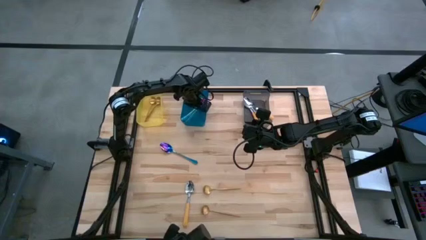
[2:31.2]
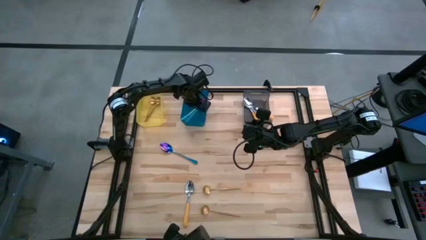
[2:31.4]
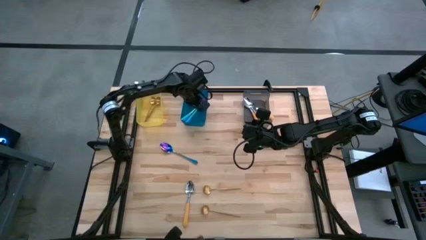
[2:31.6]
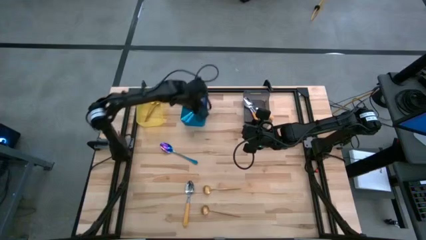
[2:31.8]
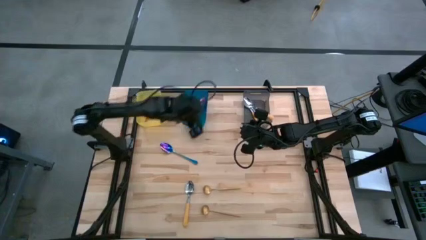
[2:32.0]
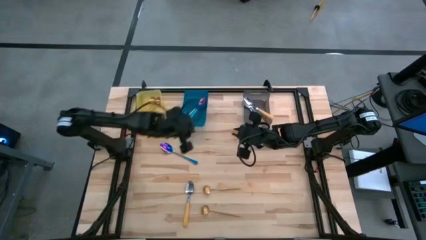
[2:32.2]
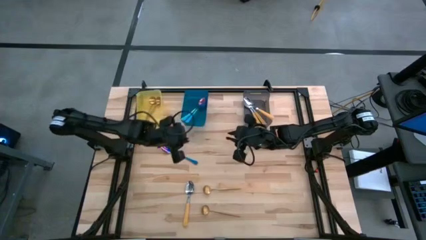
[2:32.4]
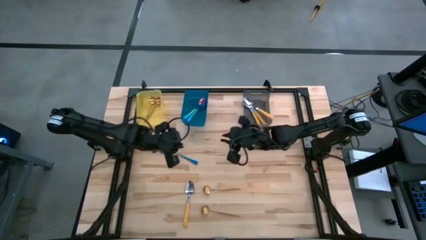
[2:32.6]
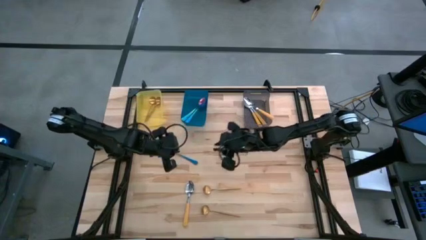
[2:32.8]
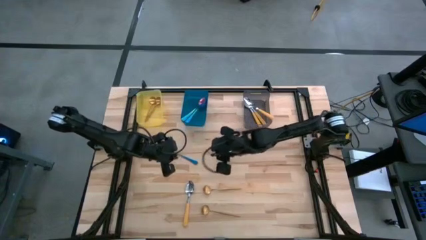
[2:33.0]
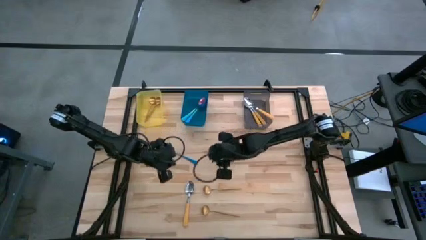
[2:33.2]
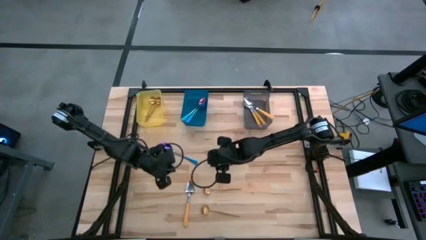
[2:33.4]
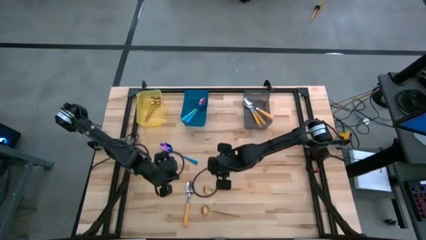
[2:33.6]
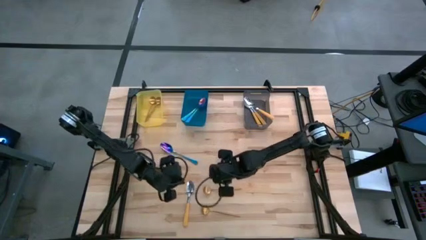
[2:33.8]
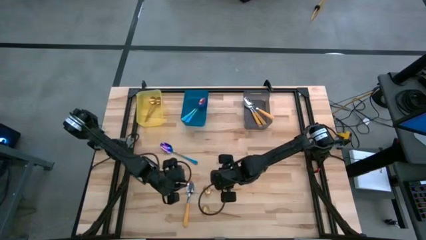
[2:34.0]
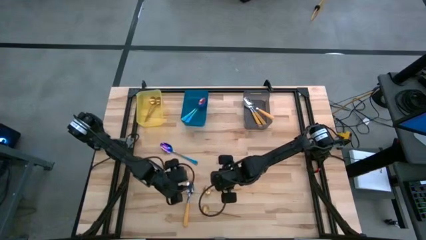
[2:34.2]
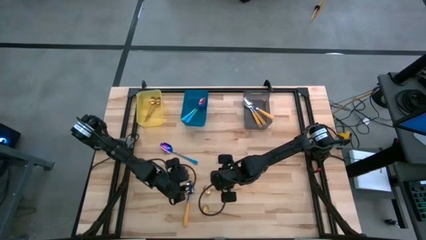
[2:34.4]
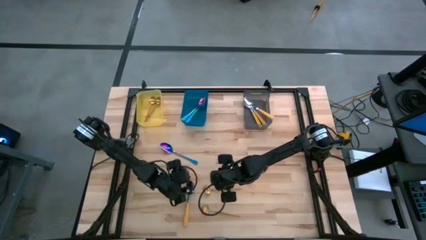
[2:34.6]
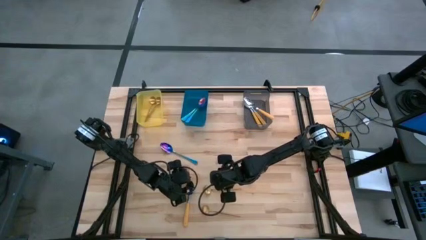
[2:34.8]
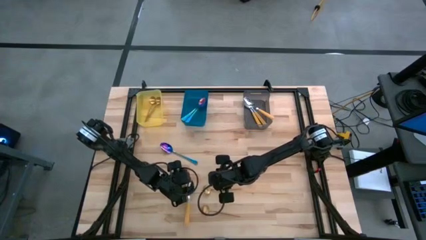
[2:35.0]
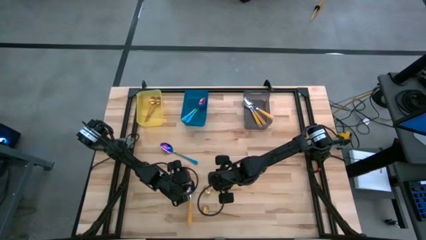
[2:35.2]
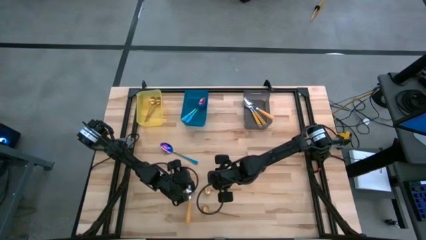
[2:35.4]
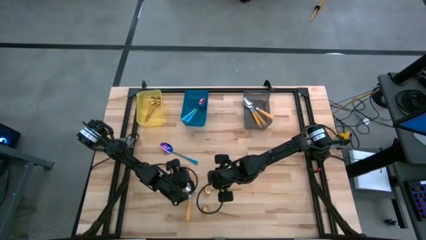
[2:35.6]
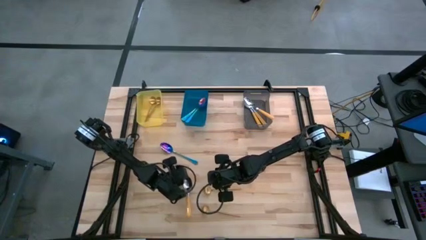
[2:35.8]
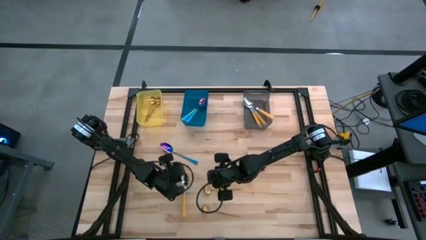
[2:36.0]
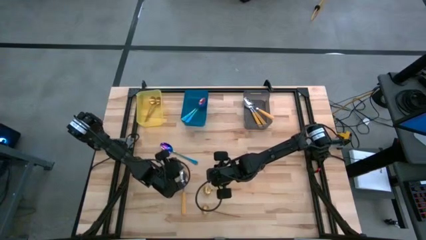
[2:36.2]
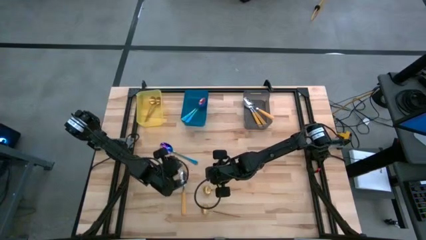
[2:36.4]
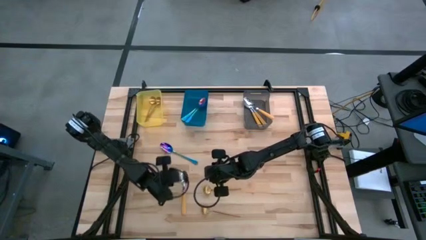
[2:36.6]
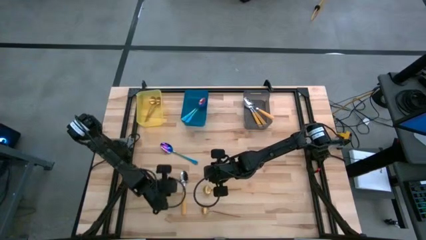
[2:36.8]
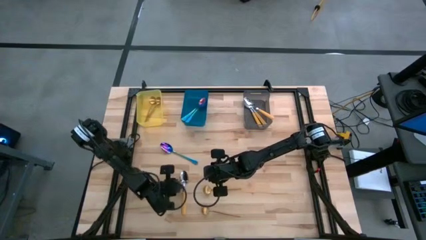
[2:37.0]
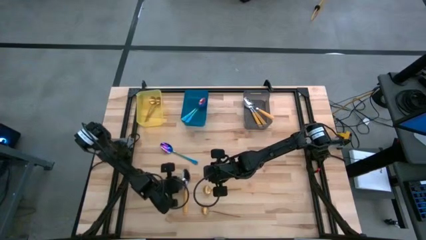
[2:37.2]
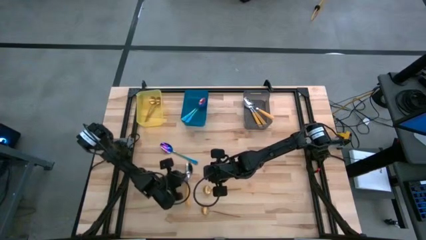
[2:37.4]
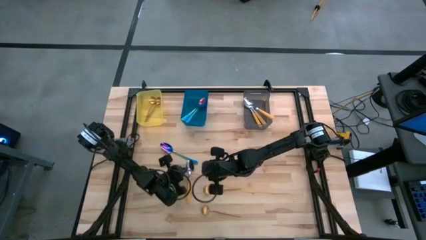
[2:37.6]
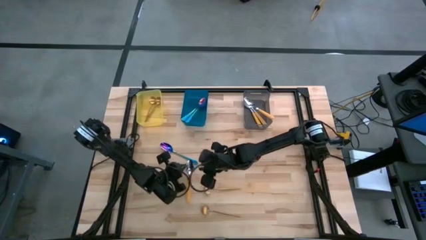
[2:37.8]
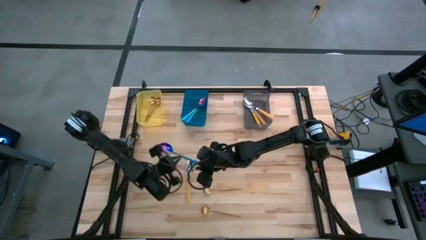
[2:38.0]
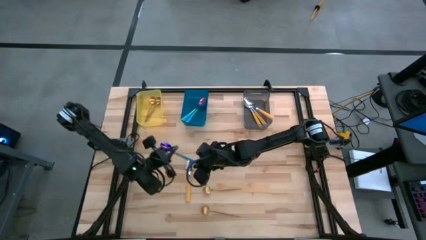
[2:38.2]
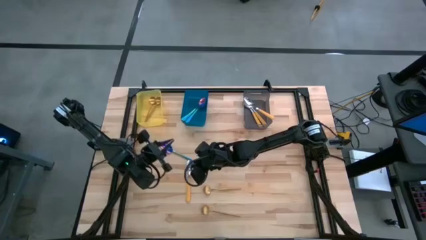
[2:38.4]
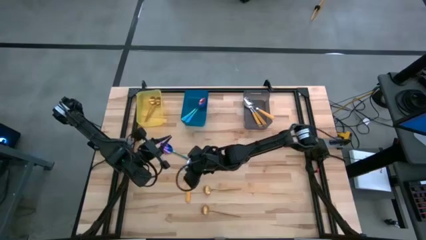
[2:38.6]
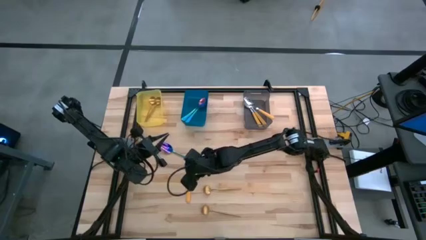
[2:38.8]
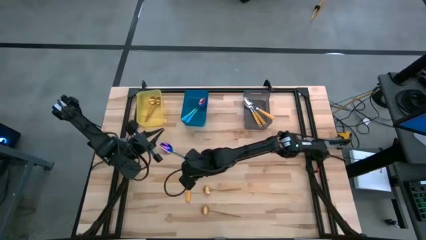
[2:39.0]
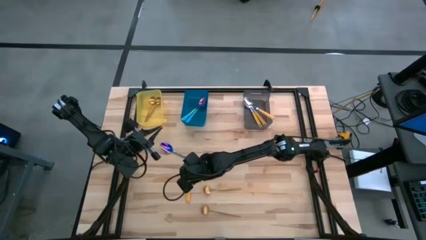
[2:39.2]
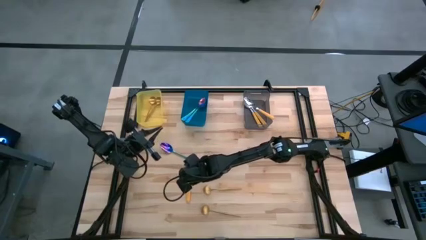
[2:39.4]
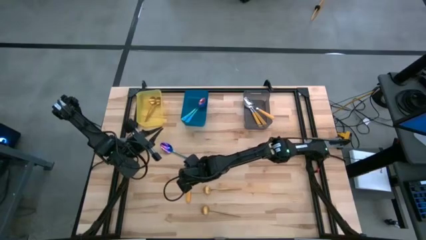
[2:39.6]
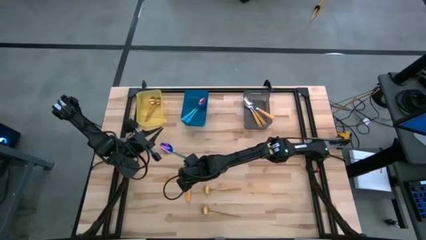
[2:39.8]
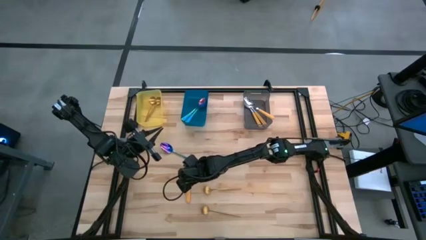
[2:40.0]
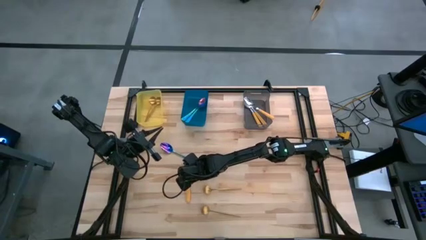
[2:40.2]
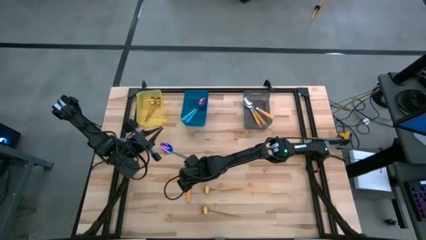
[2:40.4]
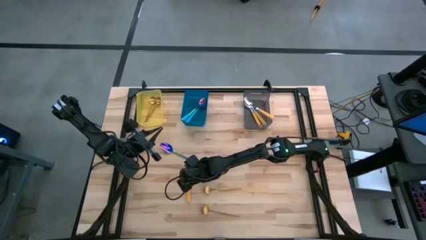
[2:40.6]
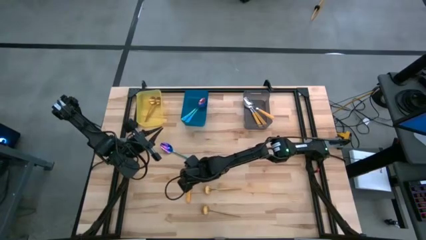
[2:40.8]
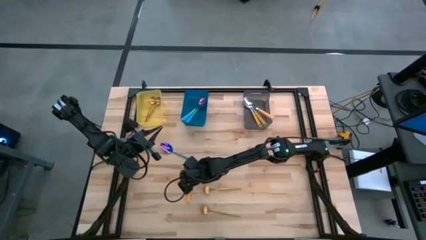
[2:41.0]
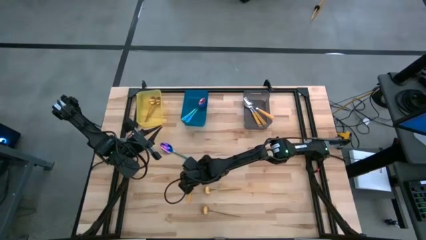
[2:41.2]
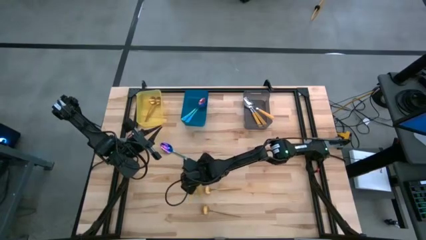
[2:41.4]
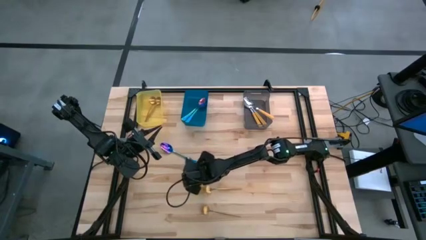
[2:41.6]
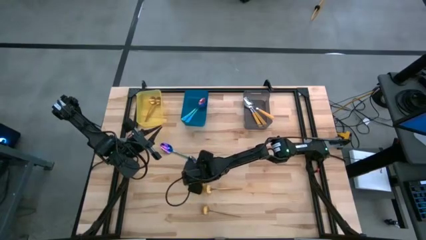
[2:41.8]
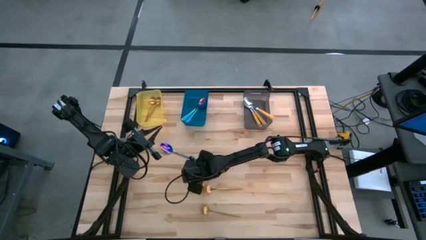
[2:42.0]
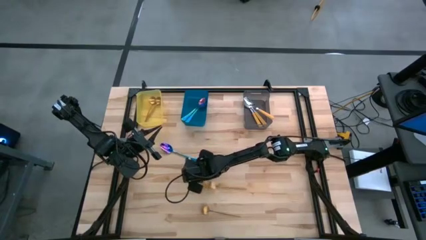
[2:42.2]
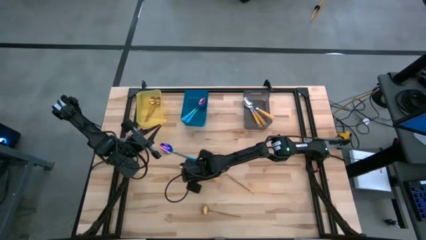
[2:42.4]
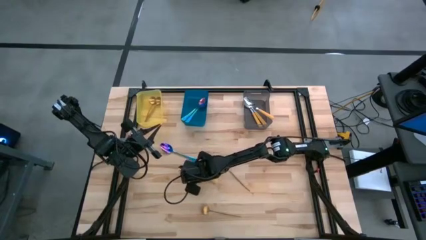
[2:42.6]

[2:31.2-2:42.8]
Task: Sort silverware by color (type)
Put the yellow spoon into the black bin

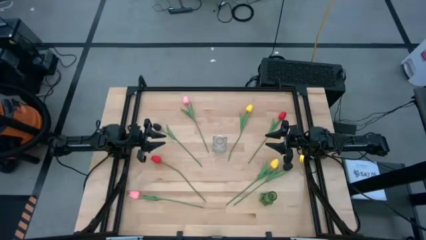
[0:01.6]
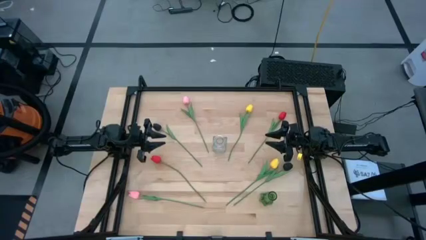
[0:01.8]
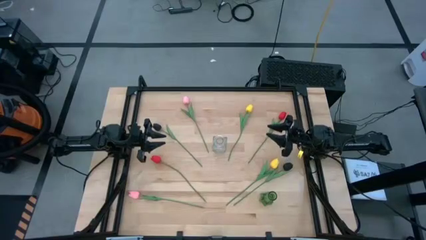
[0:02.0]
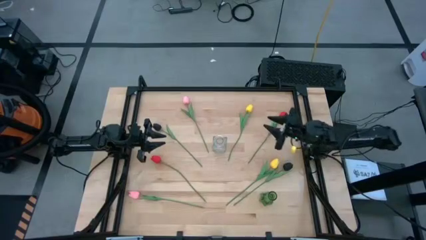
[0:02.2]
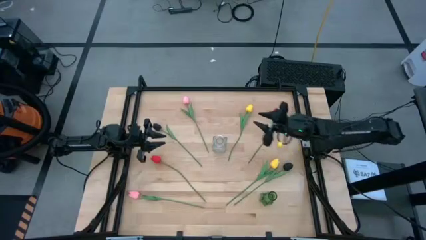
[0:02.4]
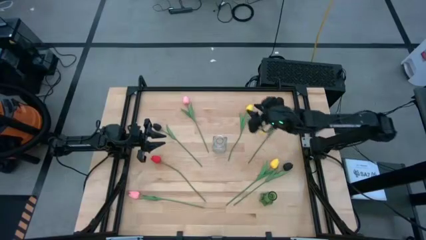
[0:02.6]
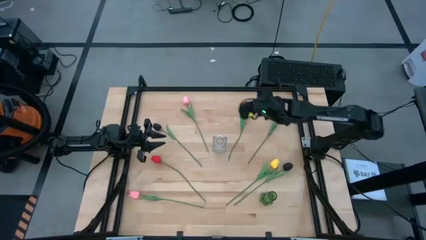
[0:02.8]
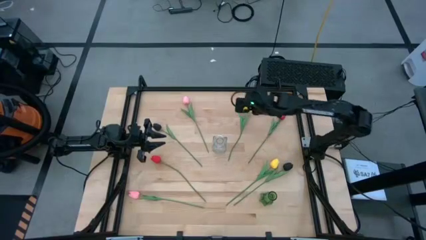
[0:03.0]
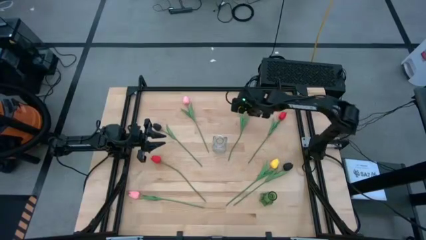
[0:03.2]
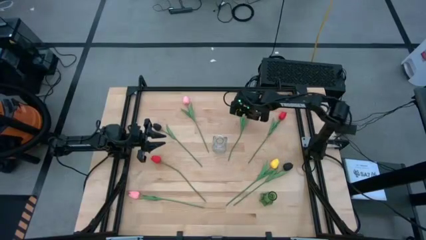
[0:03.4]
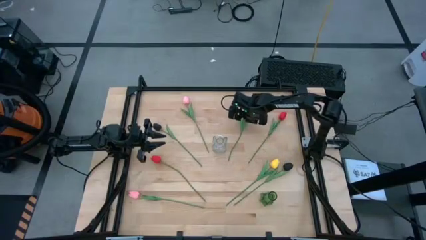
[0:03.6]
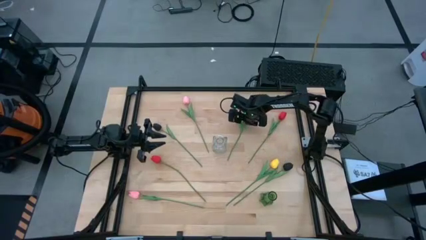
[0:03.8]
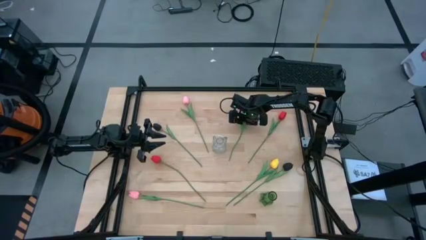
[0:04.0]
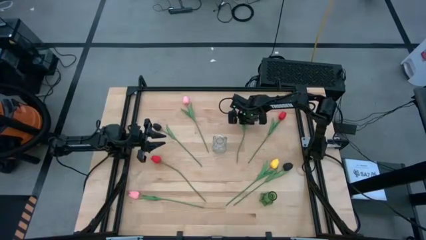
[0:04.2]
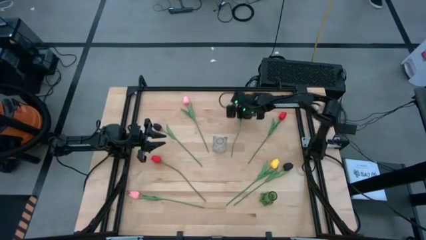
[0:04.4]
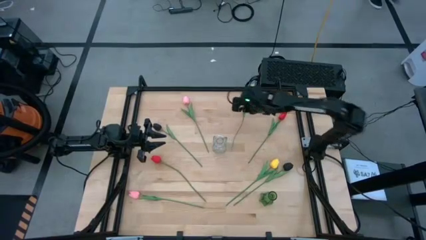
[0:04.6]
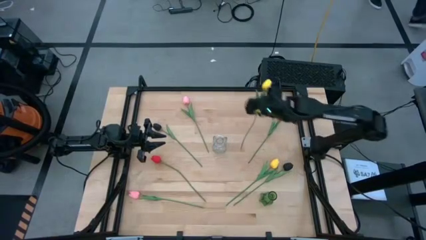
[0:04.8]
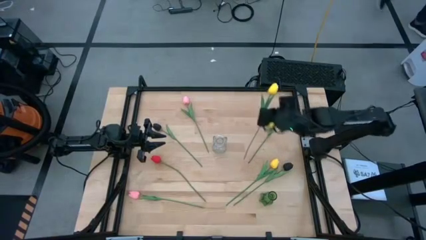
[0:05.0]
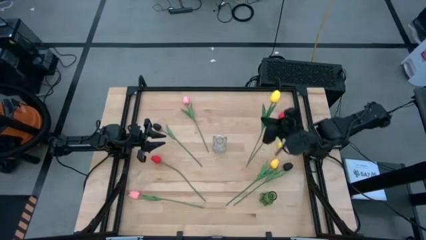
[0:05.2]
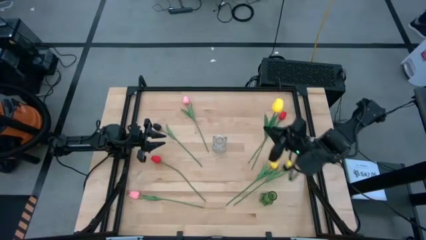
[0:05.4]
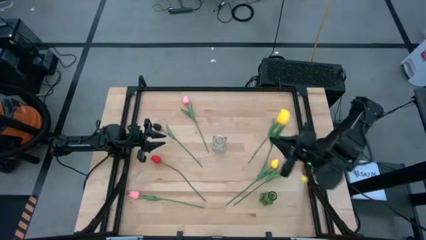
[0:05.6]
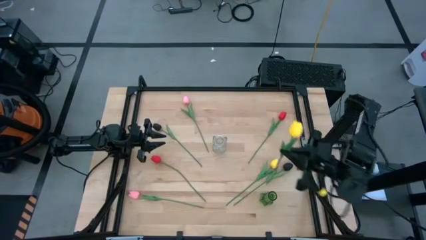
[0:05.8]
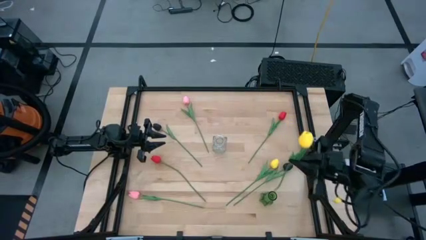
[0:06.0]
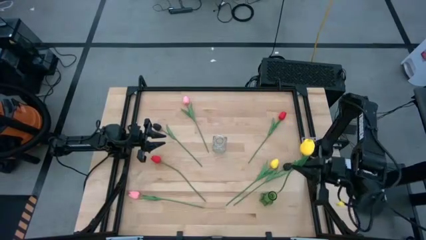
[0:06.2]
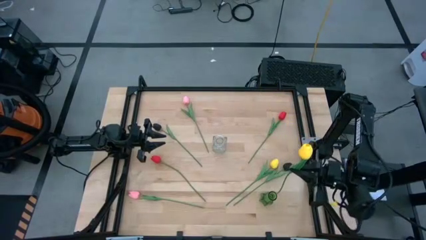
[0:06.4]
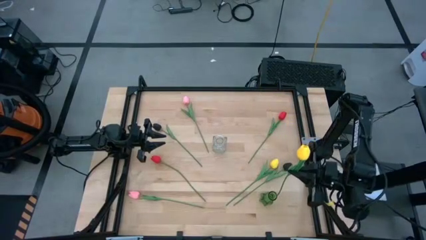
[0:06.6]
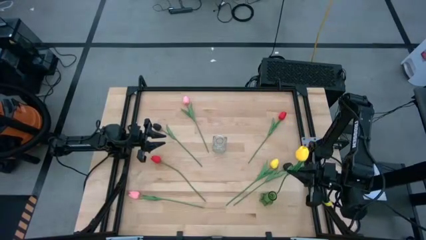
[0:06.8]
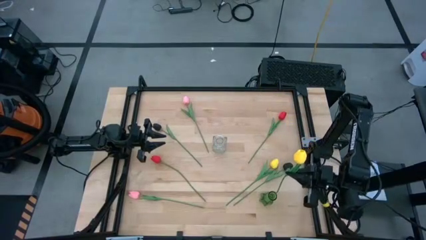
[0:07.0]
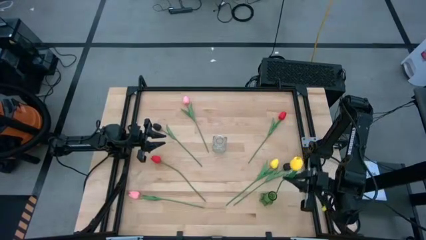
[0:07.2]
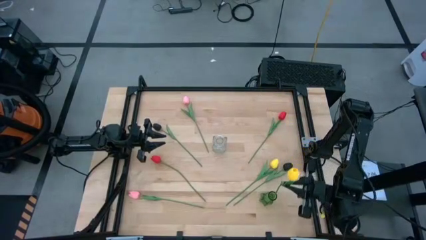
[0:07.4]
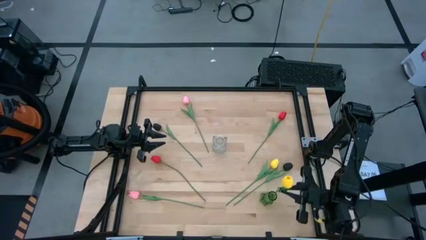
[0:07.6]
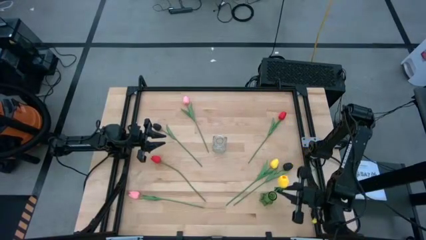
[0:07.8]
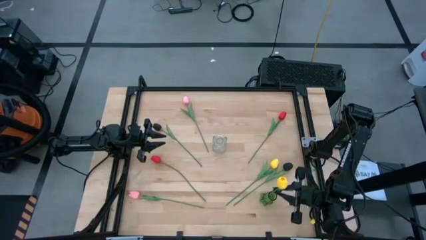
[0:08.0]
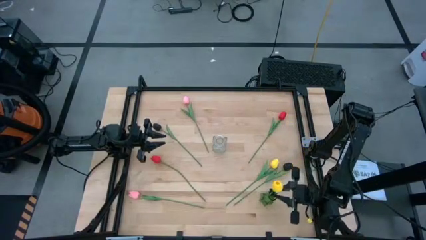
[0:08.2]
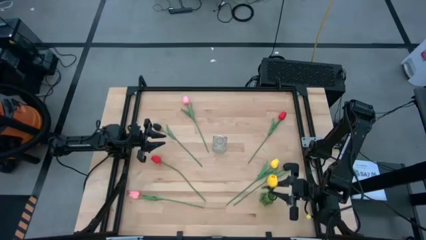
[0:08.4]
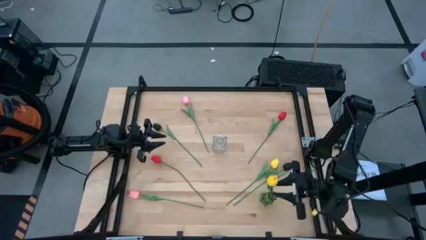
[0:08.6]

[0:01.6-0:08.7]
Task: Sort flowers into vase by color
Put the top yellow flower into the green vase
